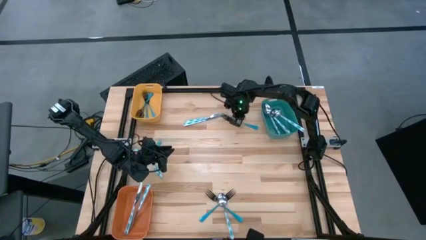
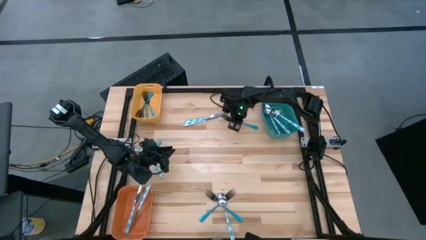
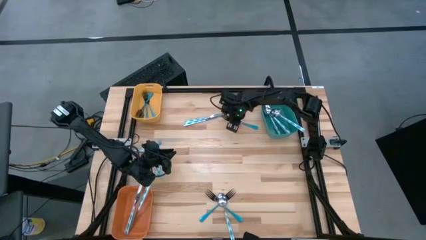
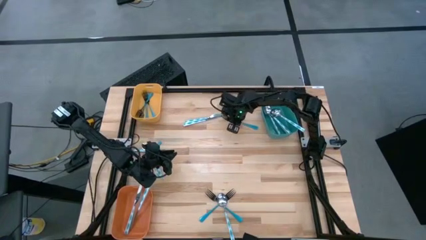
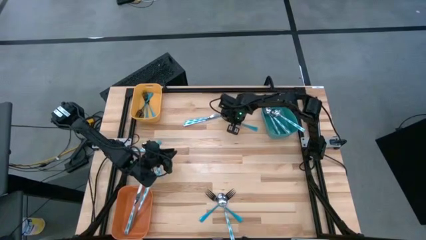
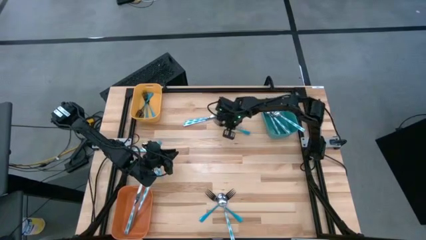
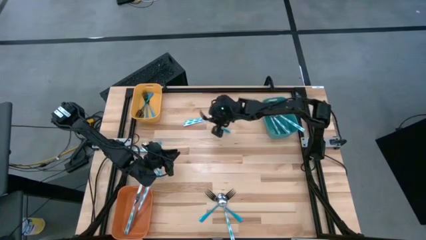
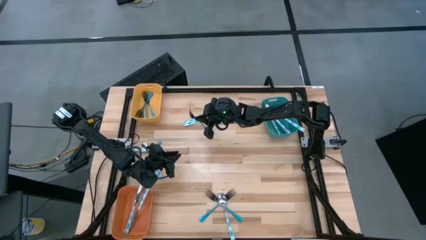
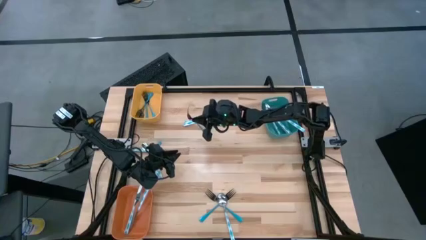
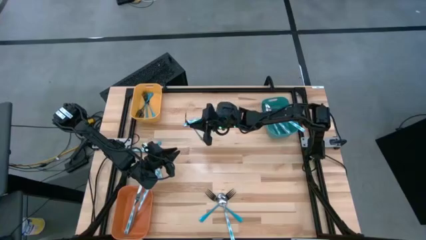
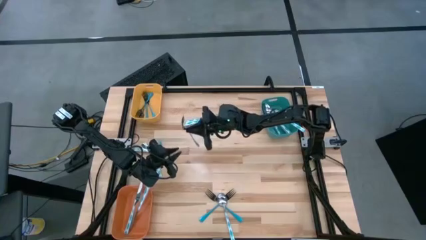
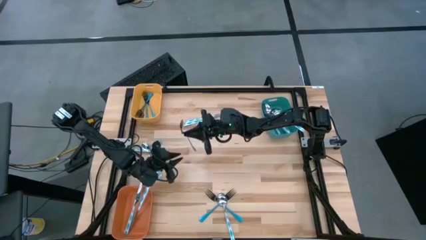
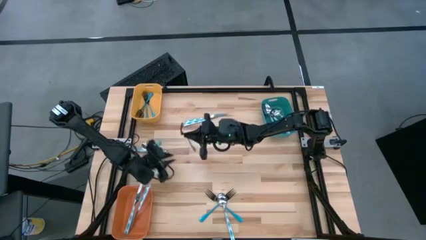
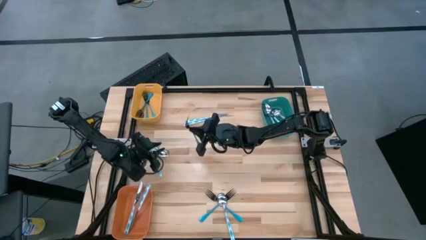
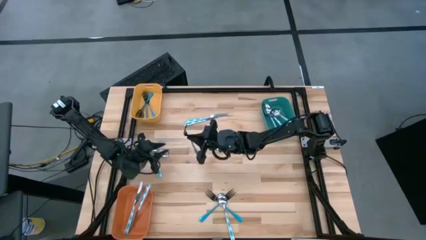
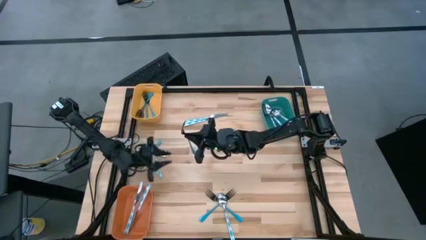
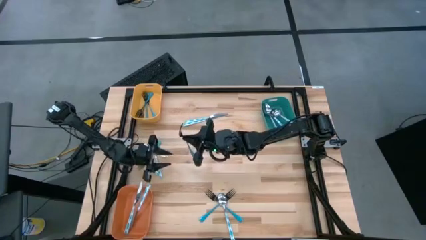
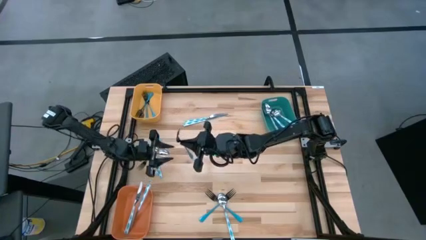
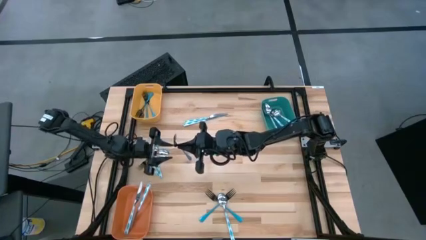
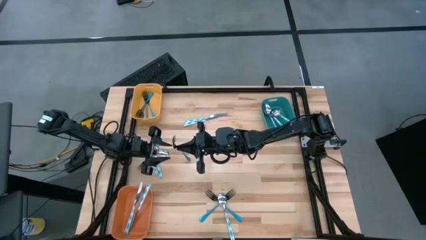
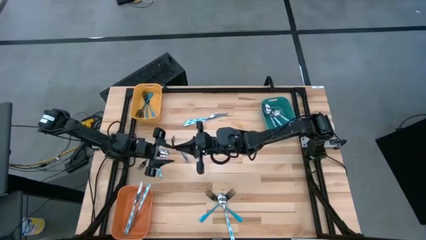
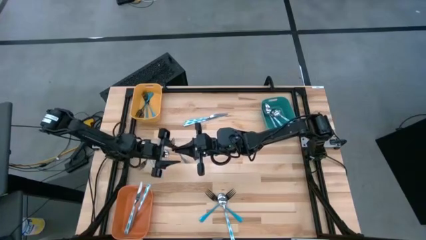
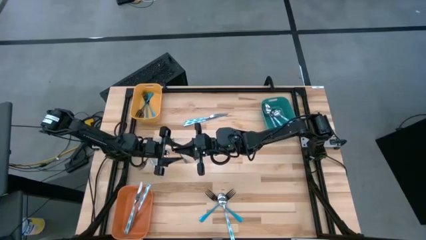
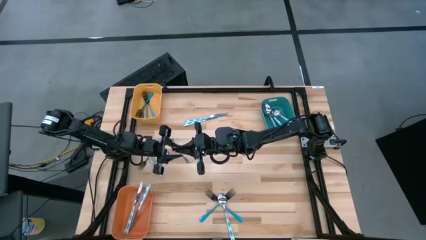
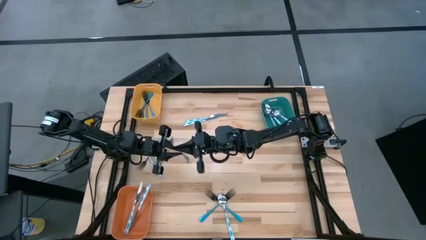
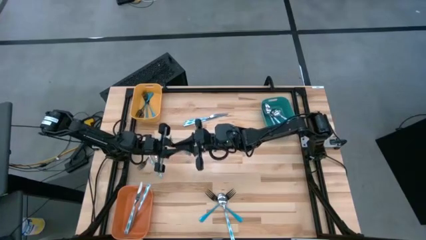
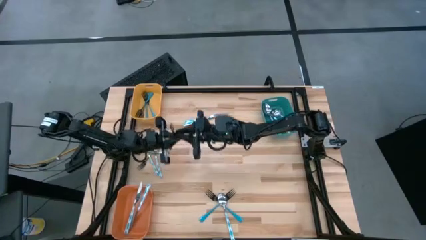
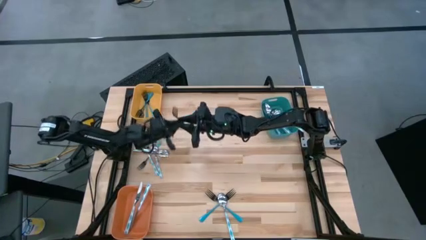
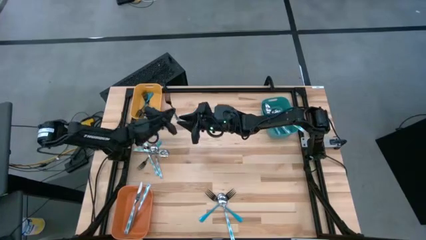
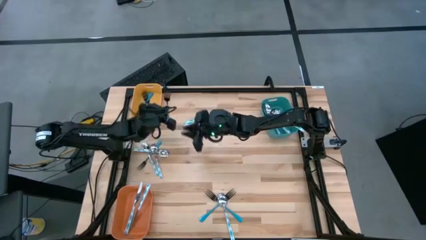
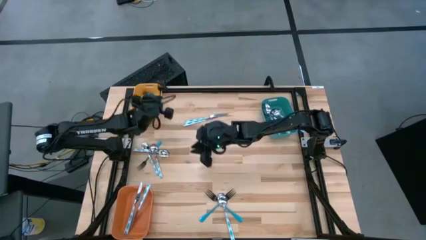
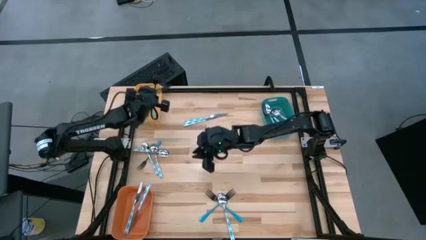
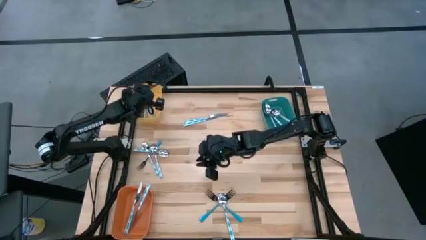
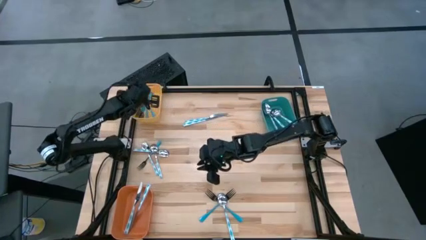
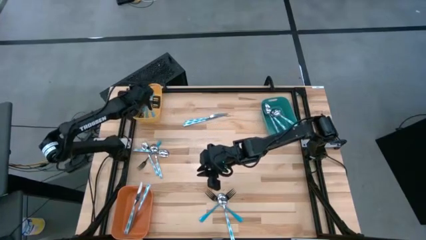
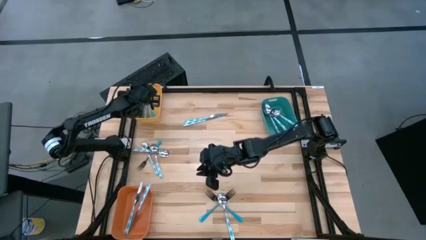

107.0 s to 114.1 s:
Task: Sort silverware by color (type)
Put the blue fork into the yellow bin

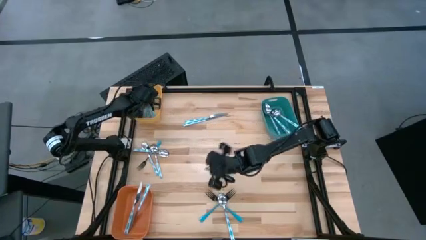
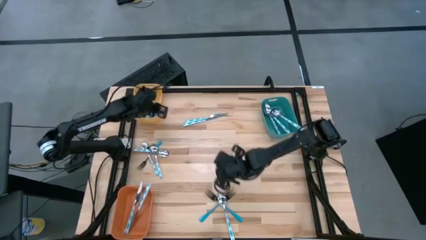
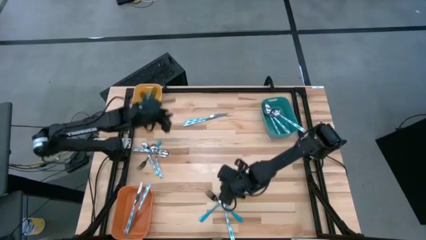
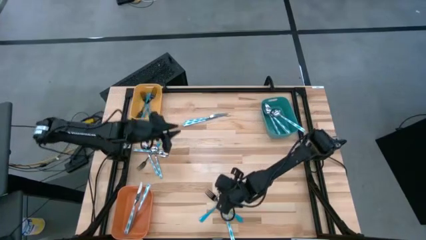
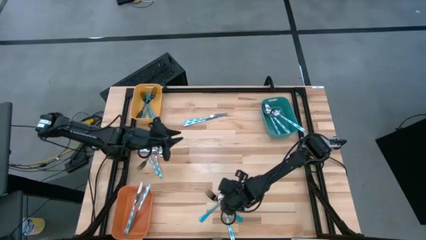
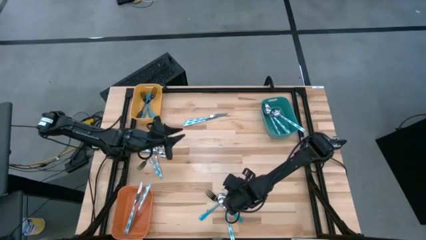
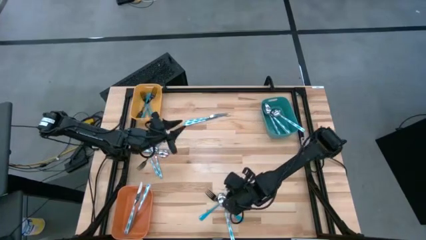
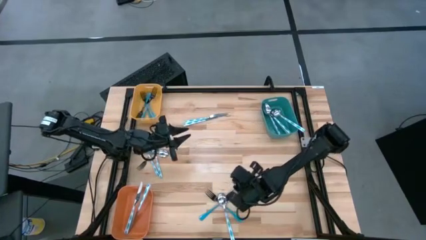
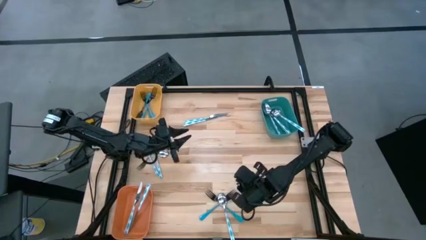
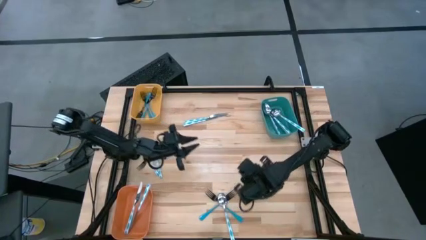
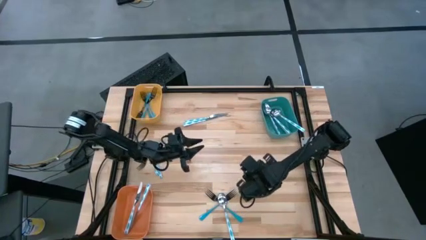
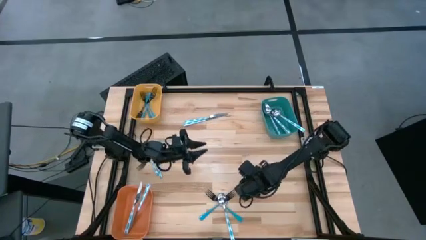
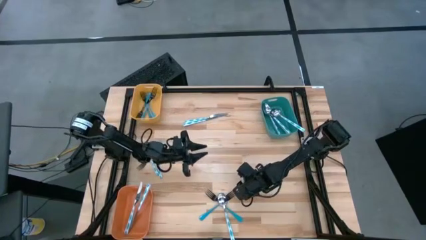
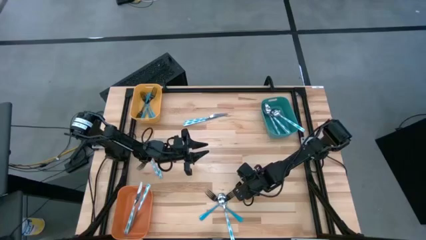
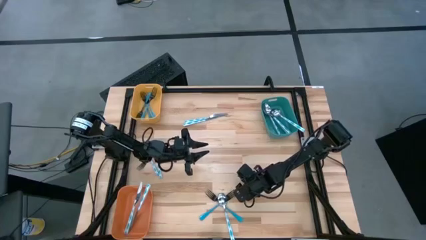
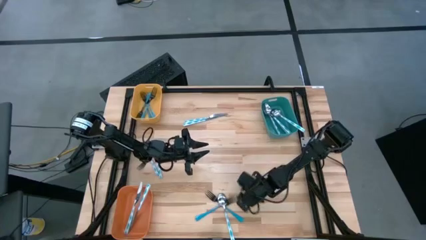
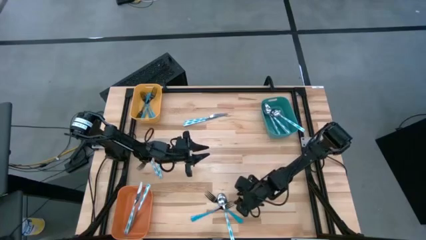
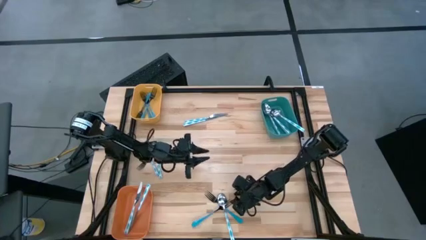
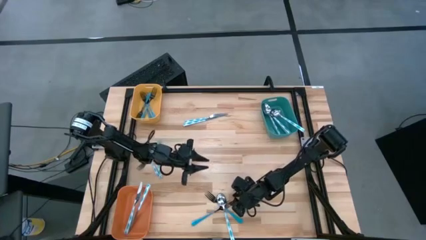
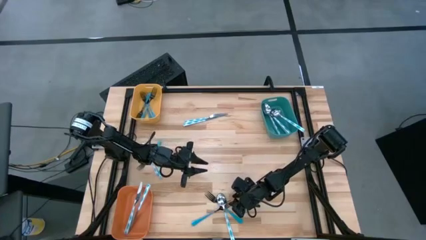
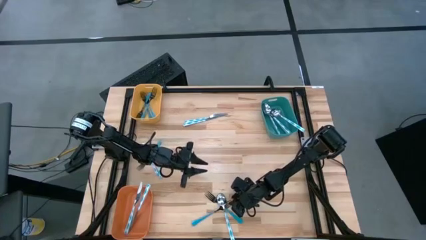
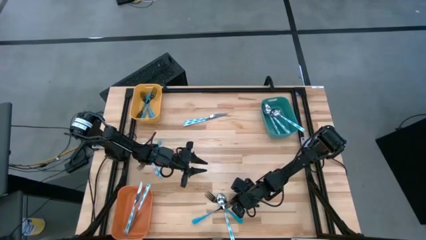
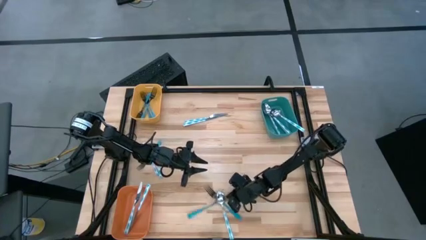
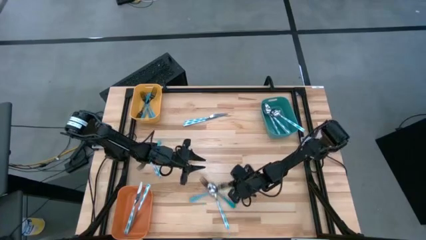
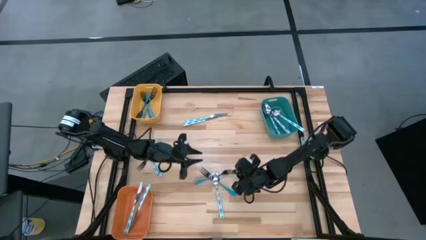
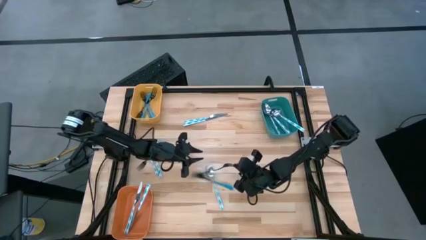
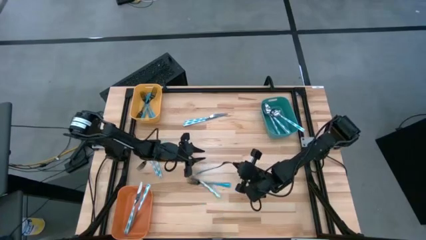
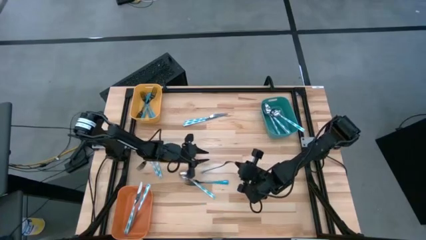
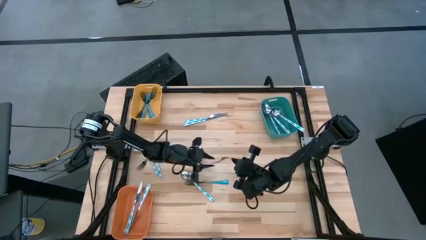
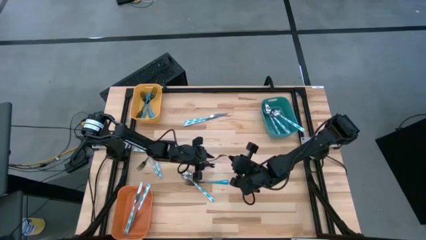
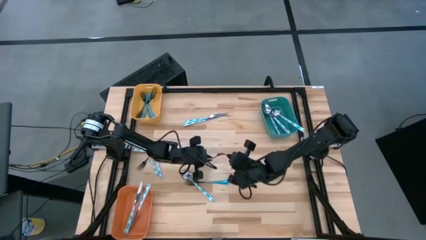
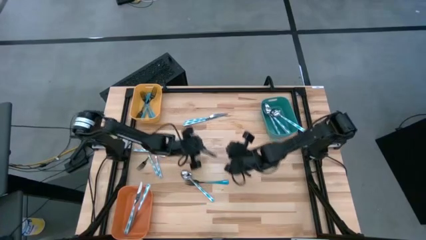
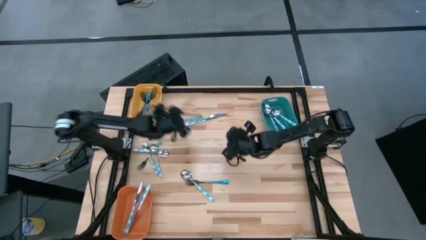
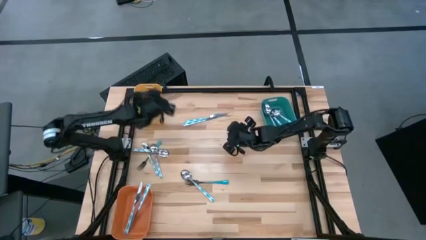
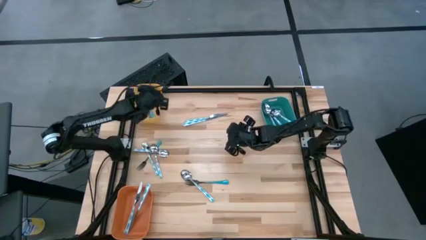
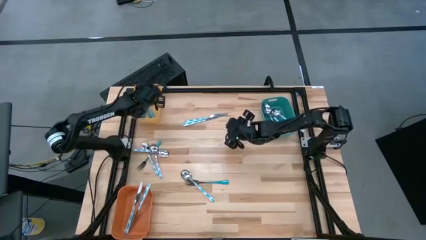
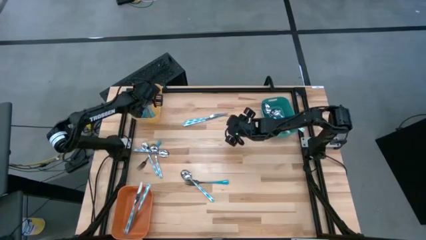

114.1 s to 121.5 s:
Put the blue fork into the yellow bin
